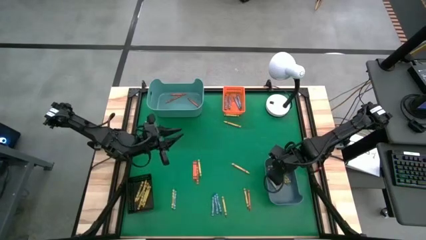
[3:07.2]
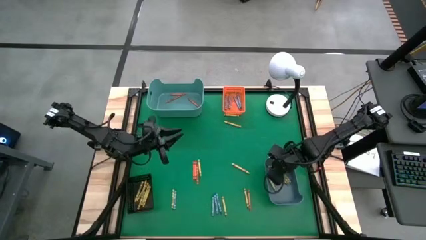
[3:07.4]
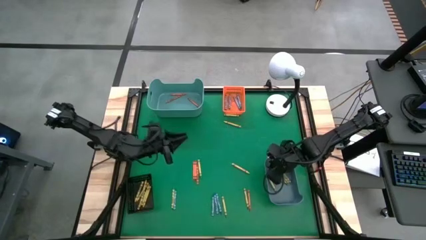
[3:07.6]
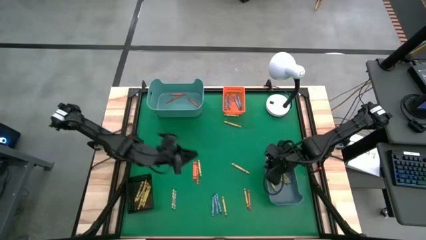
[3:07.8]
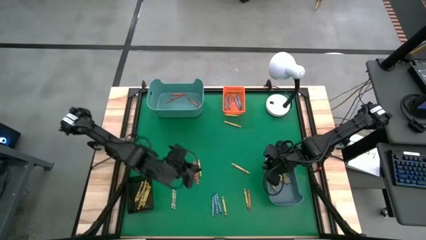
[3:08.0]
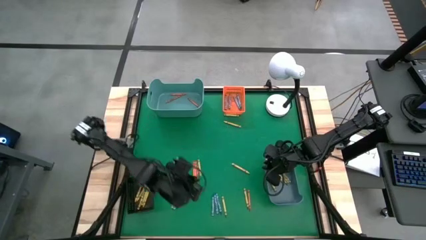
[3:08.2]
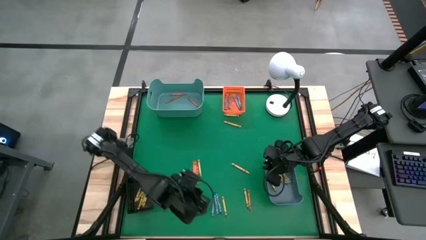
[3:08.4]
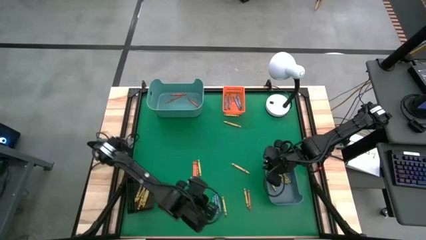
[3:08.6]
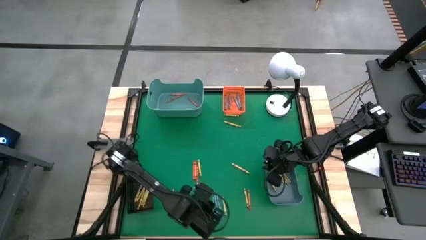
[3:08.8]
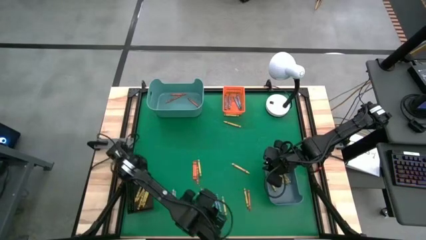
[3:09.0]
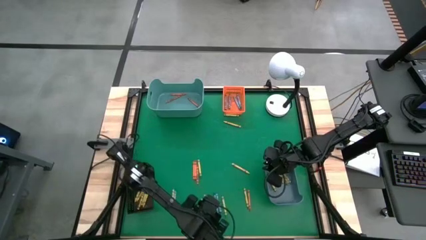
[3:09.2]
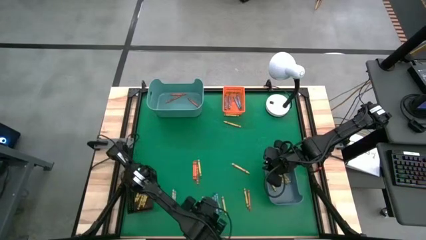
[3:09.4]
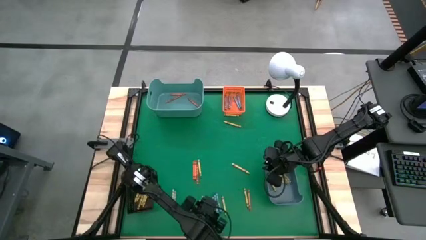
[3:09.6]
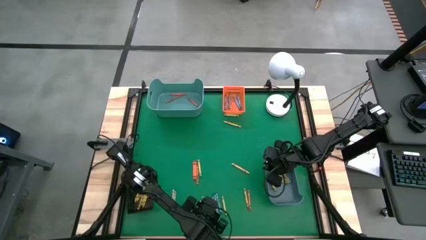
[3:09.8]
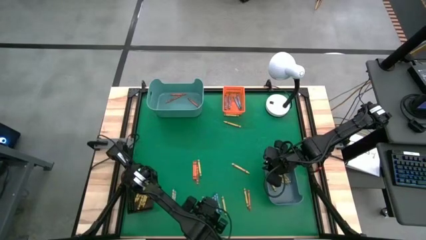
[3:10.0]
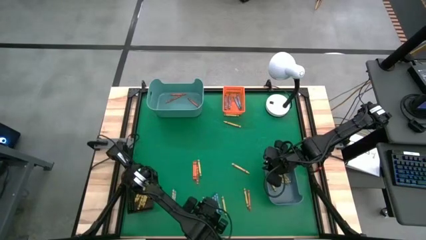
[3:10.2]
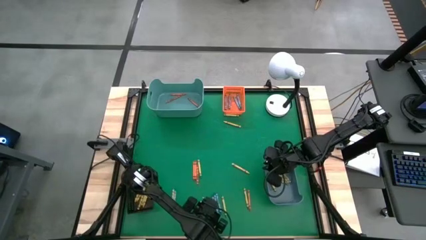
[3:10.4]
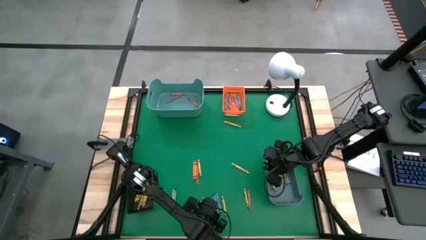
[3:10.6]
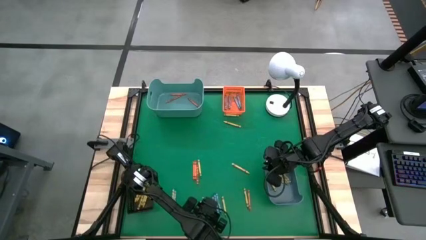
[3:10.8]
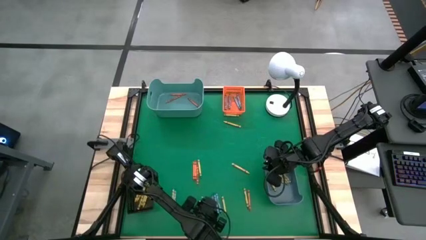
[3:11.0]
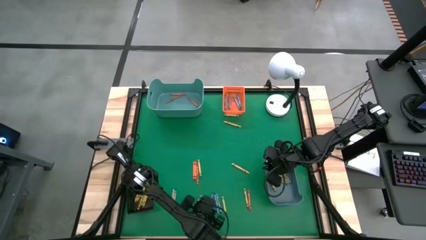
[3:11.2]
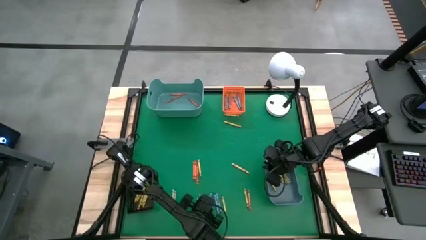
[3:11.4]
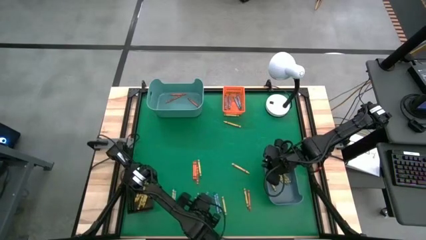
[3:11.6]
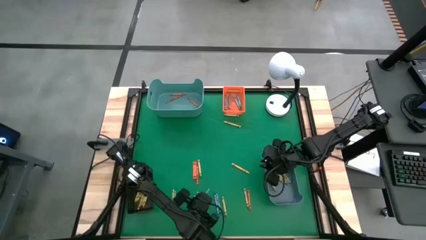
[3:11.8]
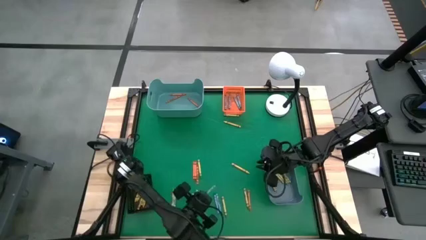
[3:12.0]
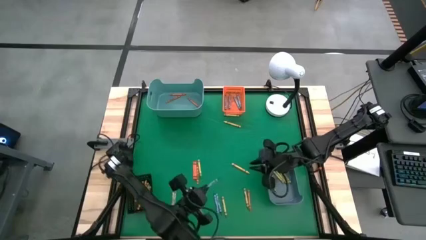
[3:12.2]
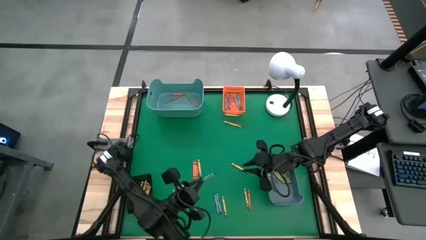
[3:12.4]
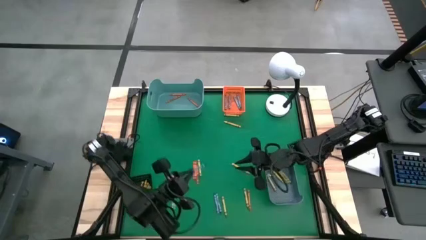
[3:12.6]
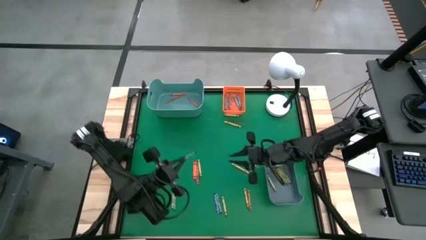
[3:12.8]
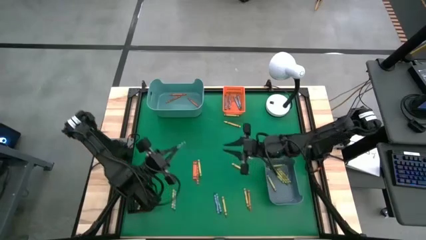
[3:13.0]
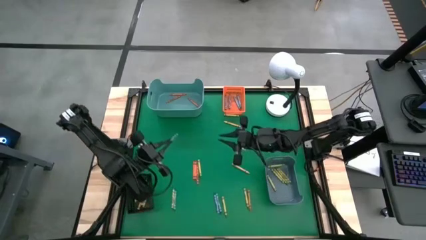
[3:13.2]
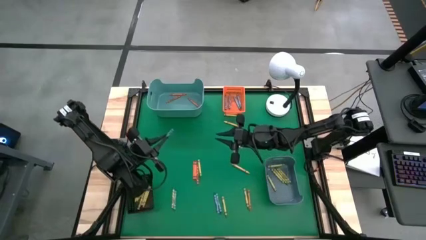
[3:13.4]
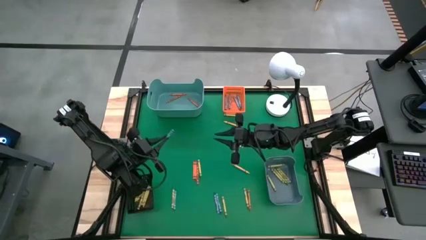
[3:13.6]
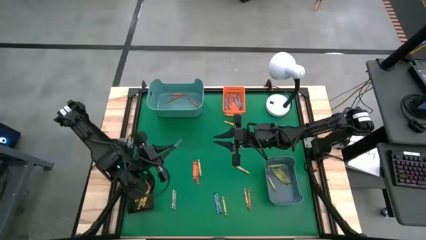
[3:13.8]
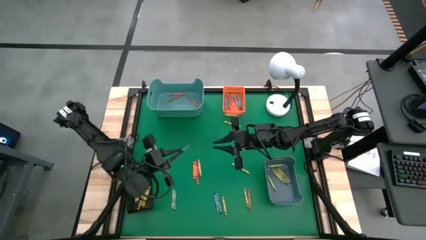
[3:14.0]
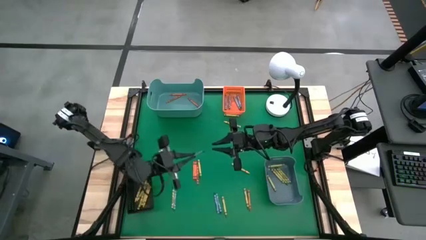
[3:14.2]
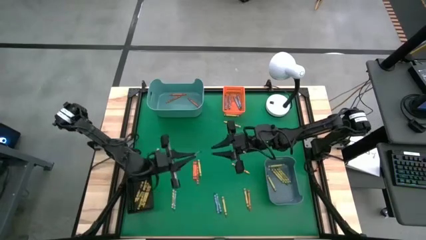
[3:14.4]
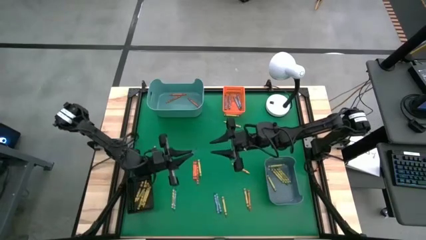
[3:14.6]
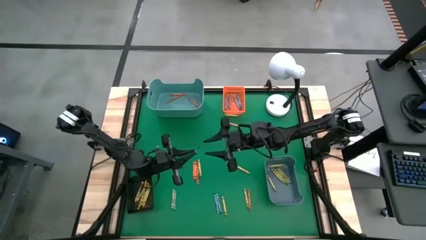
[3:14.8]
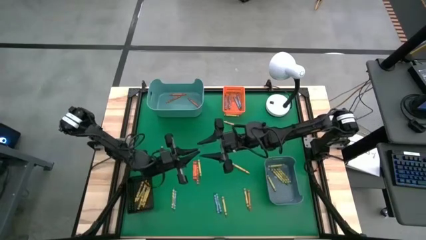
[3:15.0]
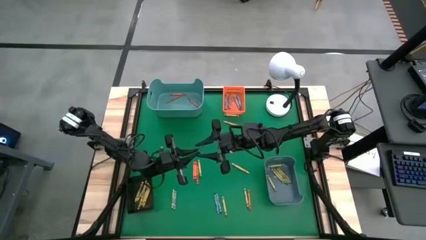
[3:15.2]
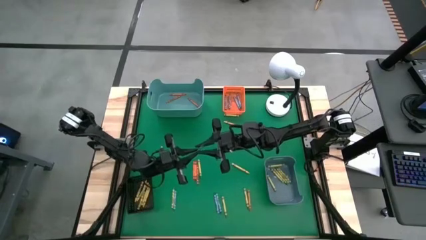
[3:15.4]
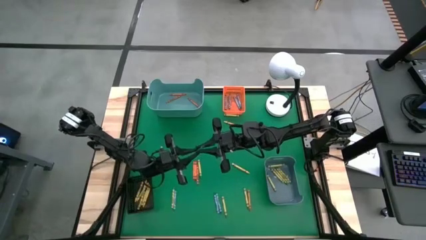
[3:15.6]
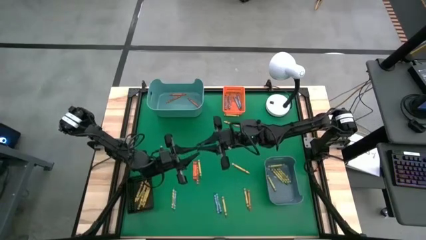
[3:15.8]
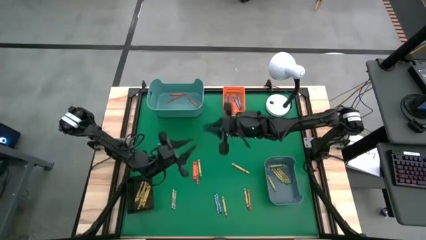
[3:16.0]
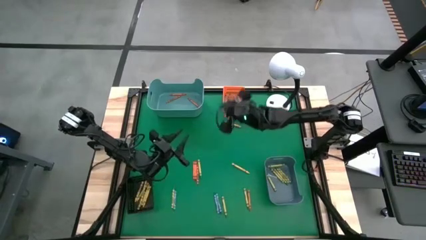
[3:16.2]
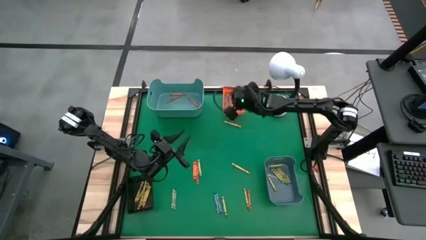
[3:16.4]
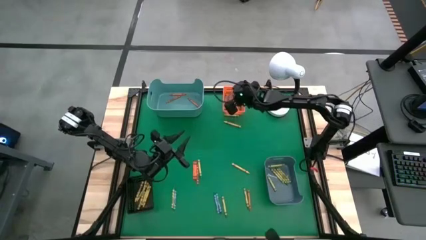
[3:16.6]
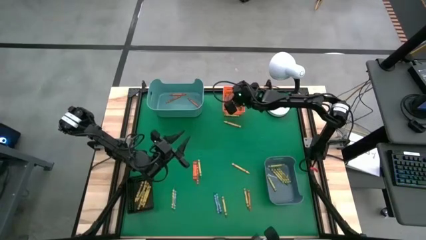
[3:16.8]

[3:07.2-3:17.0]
Task: Sort crayons
Put the blue crayon into the orange bin

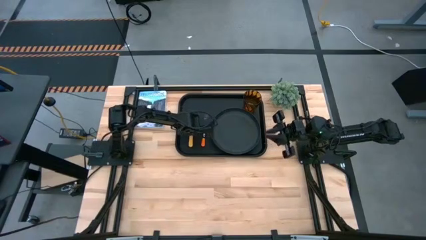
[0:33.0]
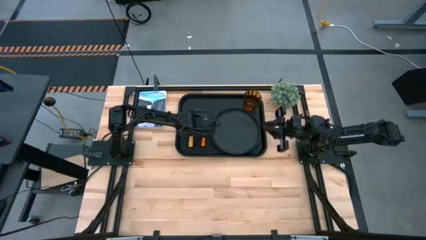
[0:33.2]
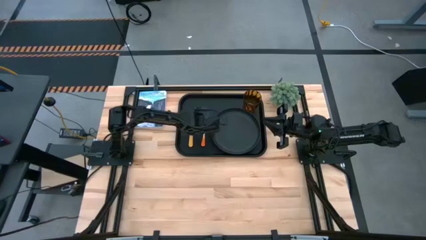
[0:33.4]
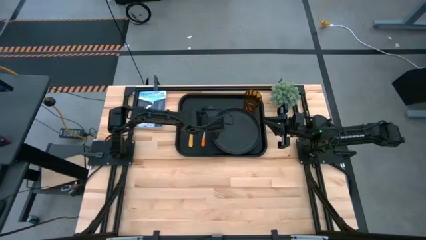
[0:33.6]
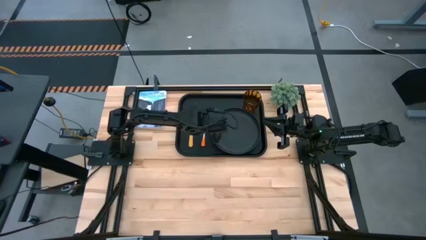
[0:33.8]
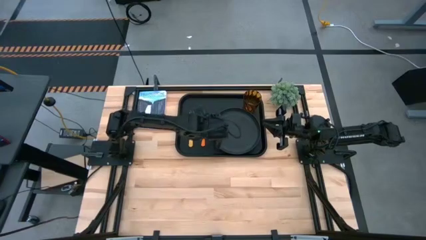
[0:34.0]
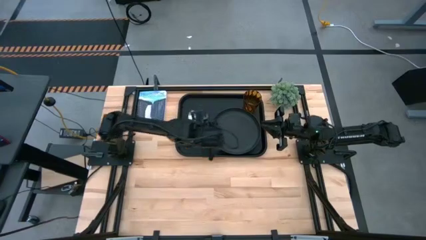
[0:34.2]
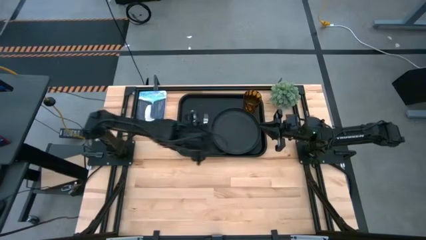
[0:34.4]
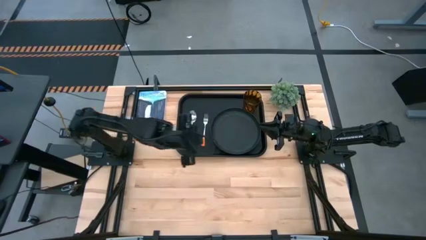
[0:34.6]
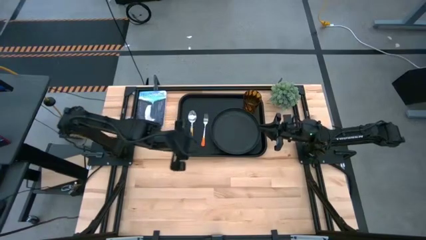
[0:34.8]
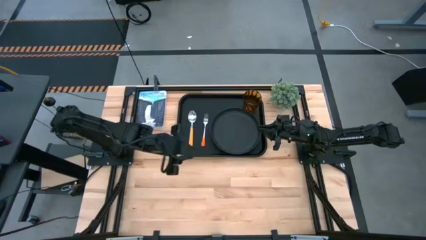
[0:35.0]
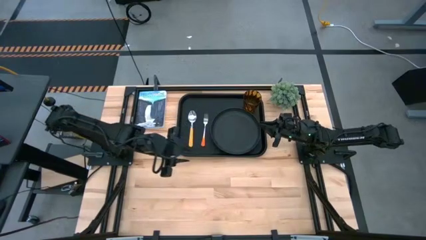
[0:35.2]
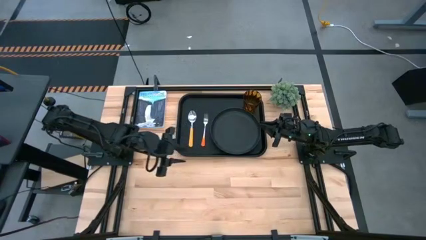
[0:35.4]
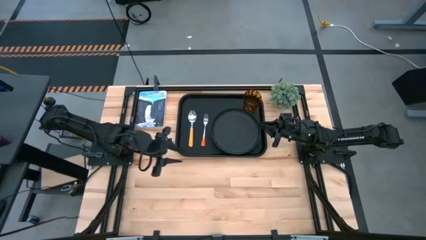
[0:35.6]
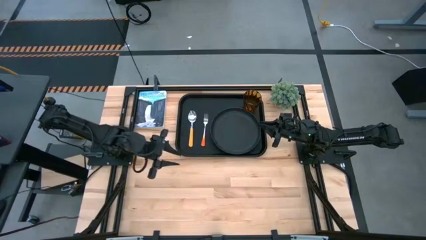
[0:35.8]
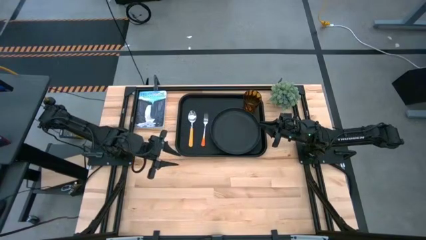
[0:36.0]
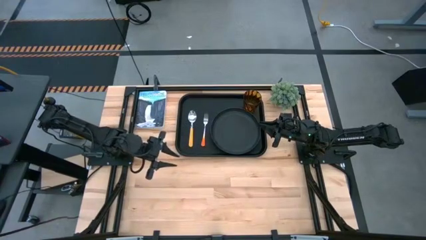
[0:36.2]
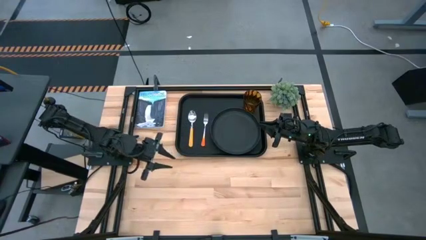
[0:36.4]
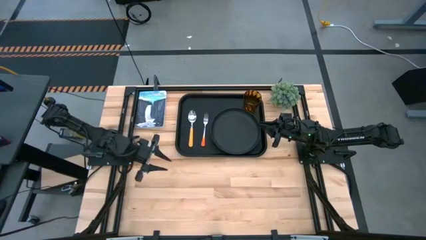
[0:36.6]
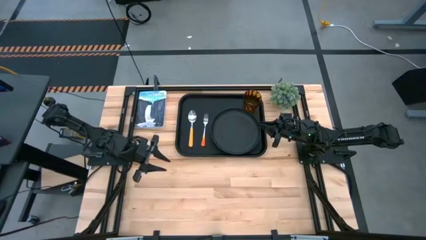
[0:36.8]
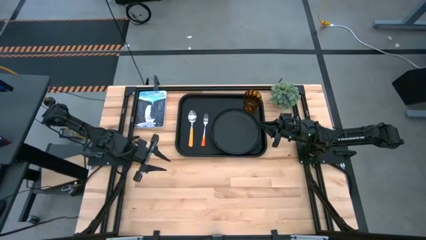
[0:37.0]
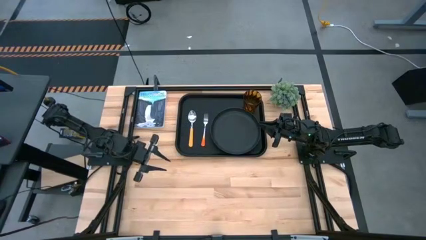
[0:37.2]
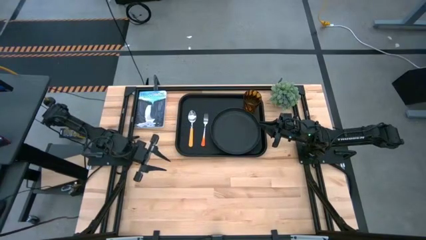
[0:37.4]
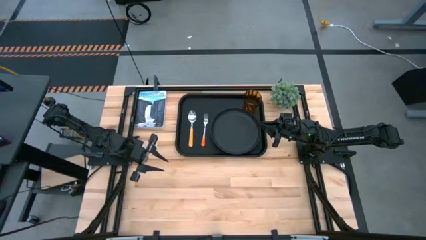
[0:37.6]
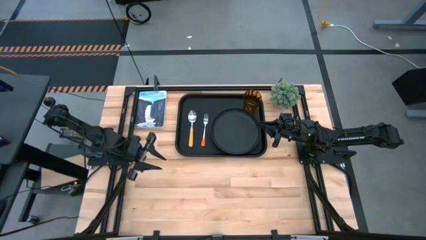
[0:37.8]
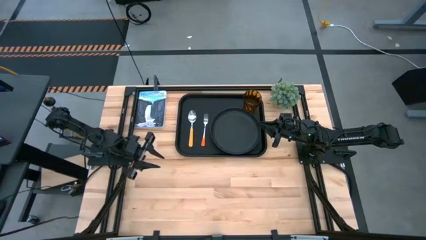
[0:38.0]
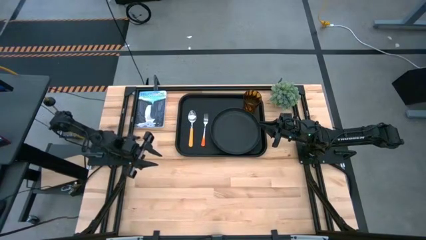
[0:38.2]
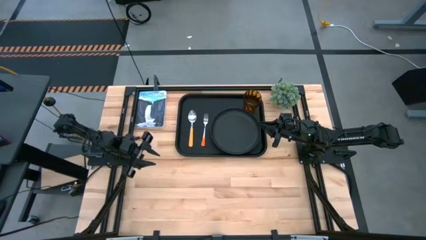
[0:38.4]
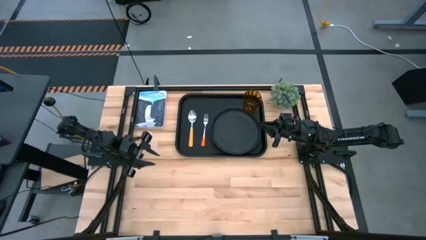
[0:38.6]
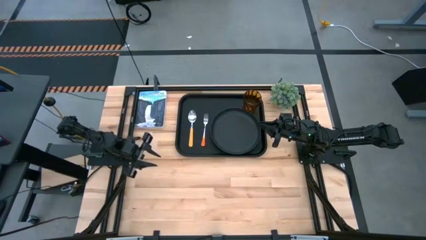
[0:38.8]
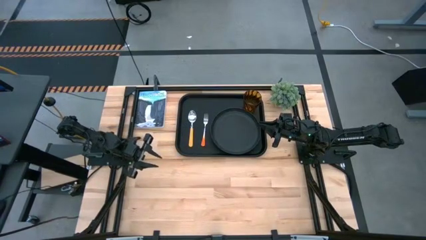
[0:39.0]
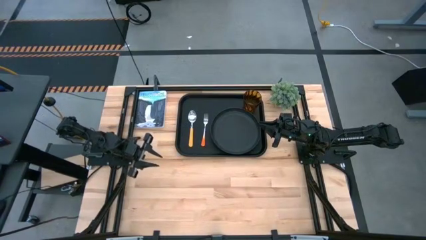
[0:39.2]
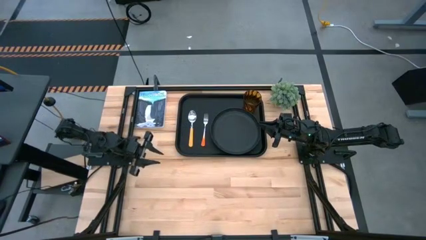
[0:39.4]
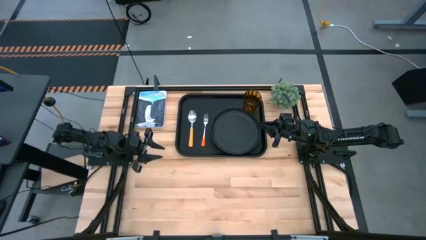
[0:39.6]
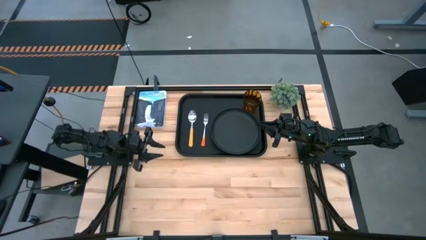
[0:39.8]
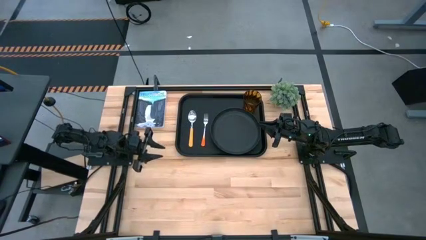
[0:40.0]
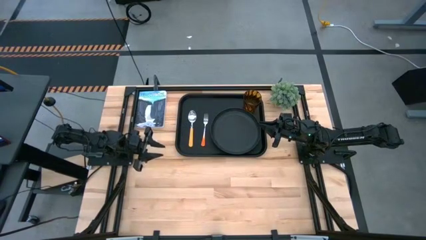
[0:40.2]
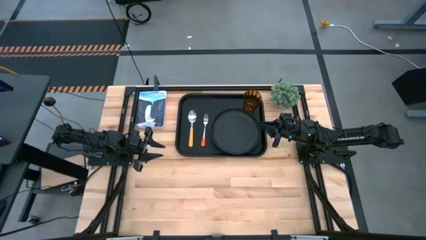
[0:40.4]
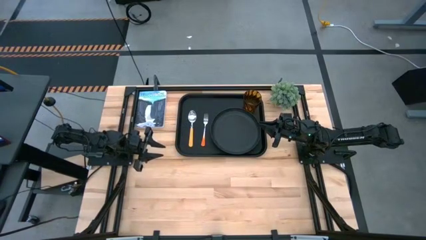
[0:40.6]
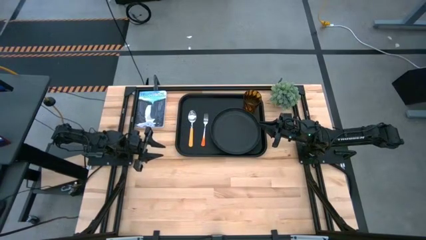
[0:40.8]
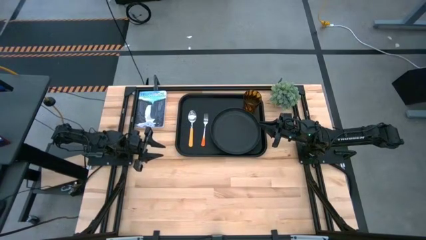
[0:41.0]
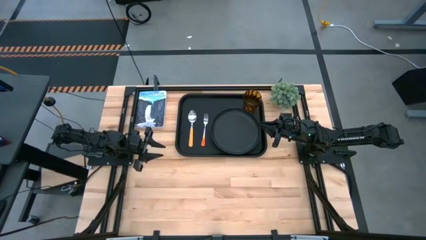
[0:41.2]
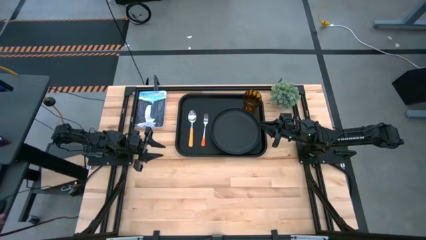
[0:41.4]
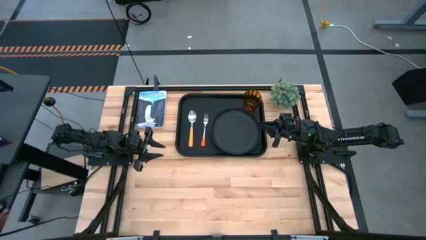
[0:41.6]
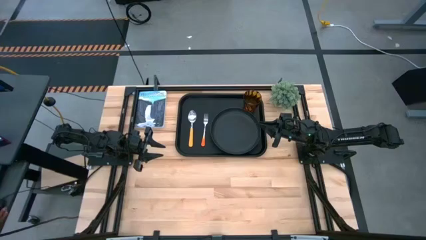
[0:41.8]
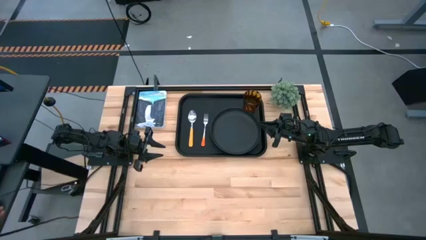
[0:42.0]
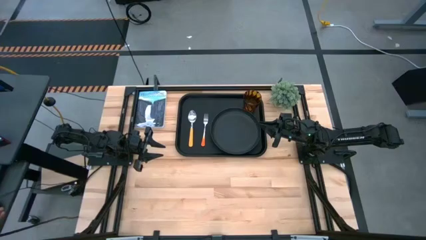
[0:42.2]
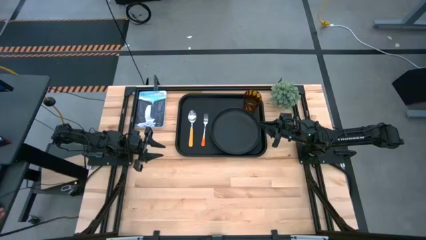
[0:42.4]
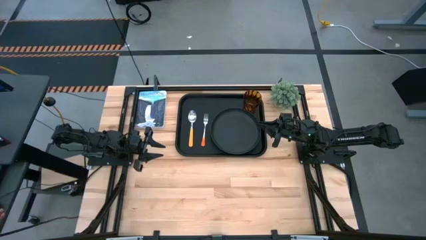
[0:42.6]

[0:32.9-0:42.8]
Task: Pick and place plate/cup/fork/spoon on tray
Return to Home Position
